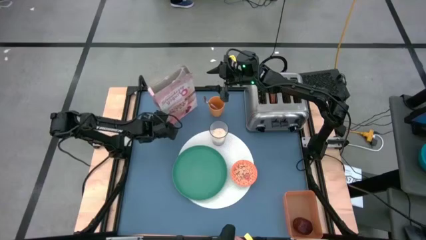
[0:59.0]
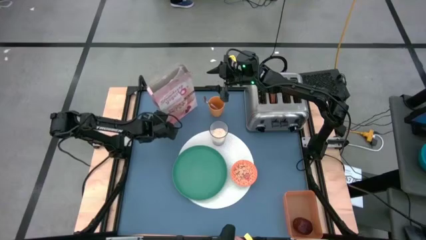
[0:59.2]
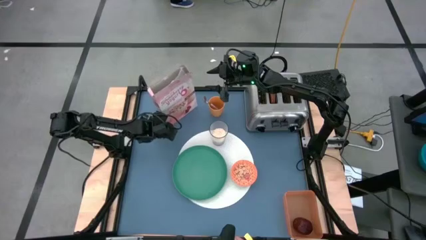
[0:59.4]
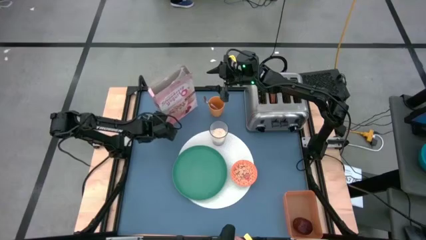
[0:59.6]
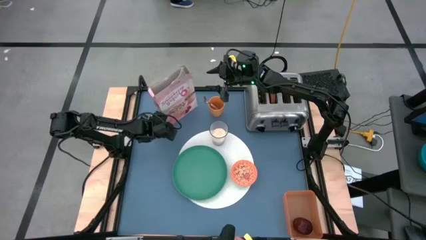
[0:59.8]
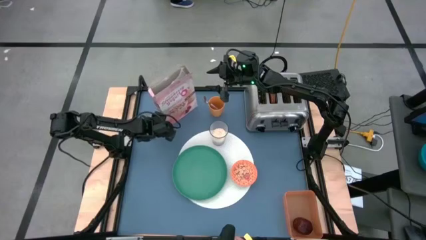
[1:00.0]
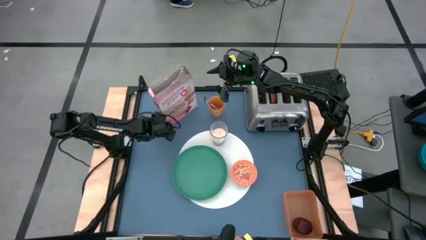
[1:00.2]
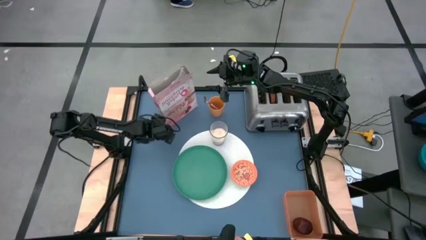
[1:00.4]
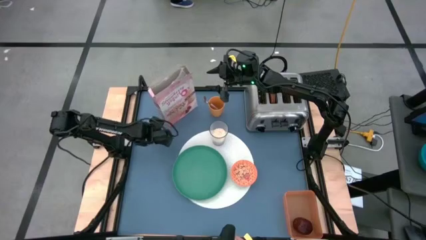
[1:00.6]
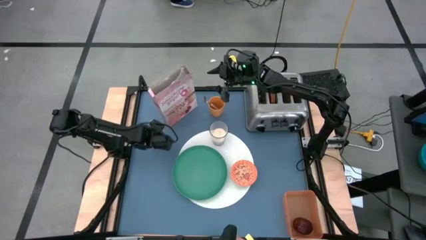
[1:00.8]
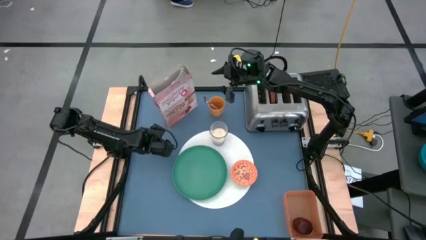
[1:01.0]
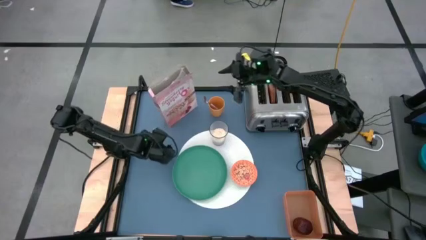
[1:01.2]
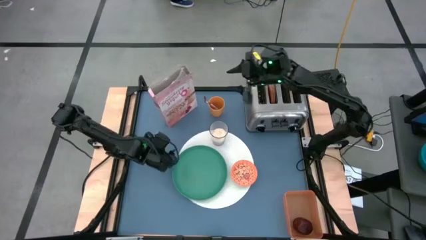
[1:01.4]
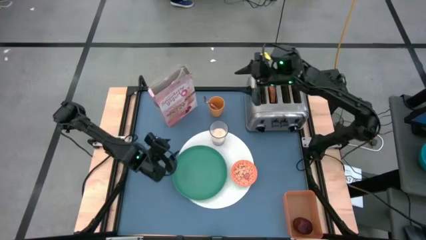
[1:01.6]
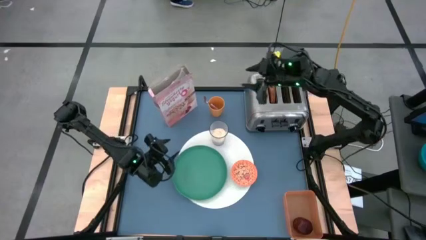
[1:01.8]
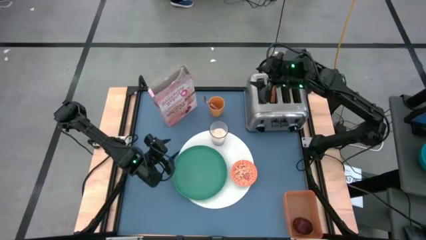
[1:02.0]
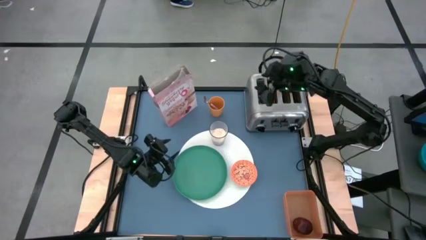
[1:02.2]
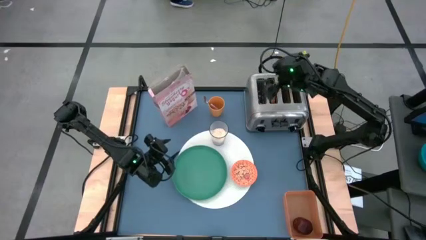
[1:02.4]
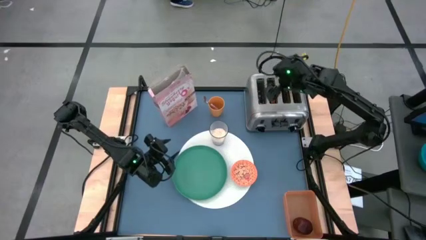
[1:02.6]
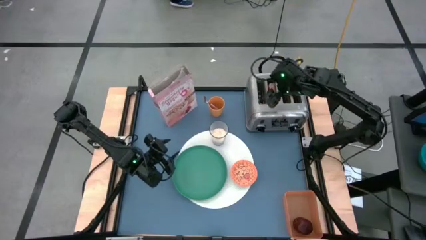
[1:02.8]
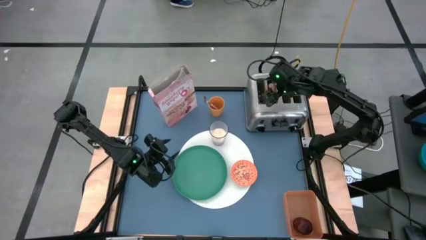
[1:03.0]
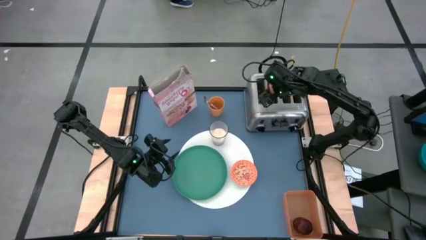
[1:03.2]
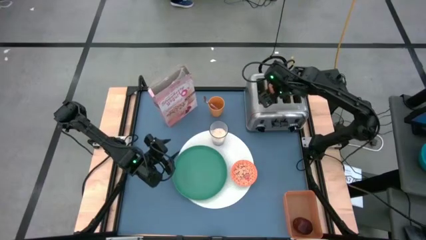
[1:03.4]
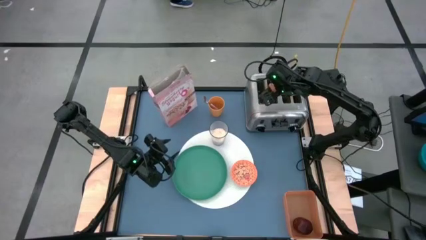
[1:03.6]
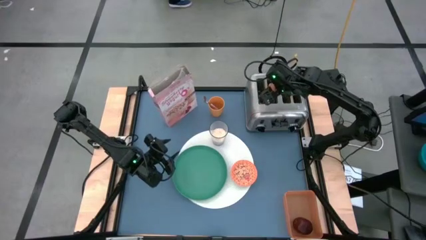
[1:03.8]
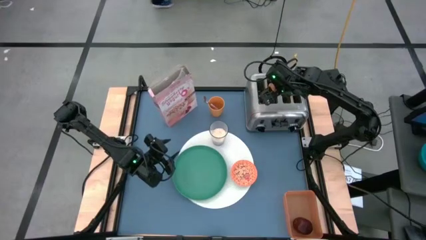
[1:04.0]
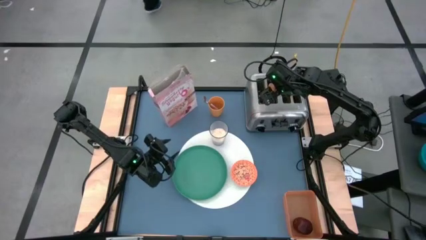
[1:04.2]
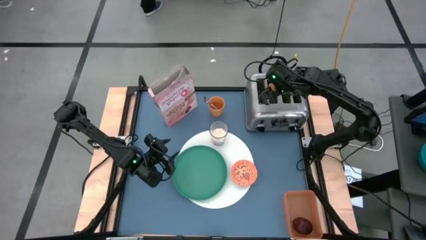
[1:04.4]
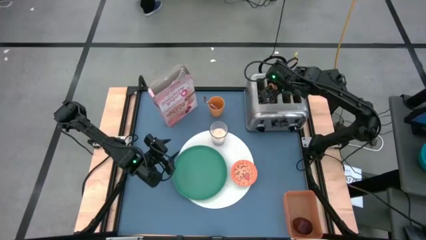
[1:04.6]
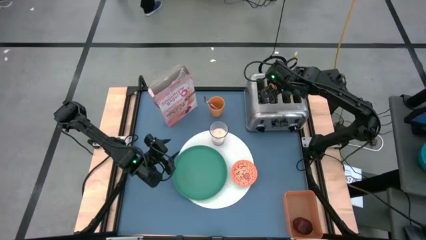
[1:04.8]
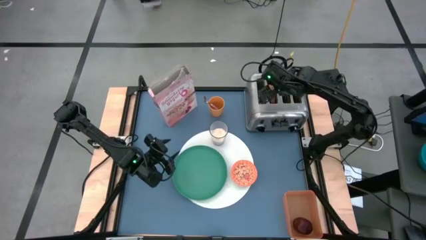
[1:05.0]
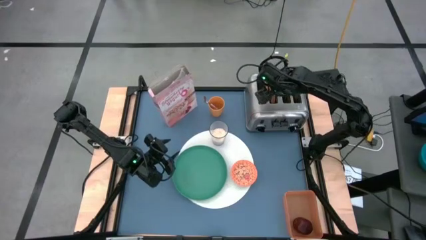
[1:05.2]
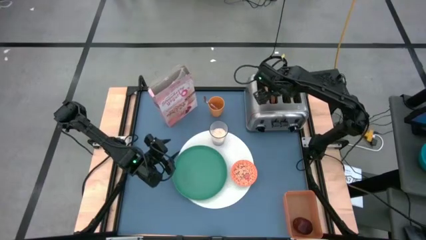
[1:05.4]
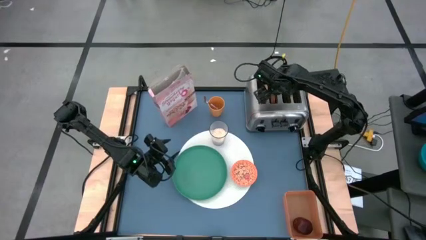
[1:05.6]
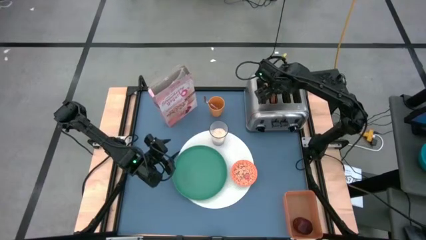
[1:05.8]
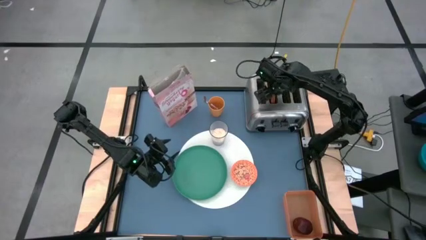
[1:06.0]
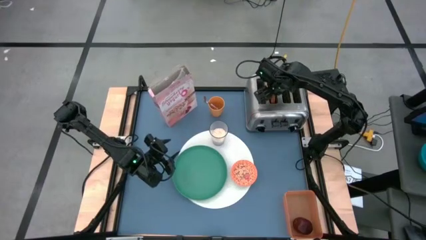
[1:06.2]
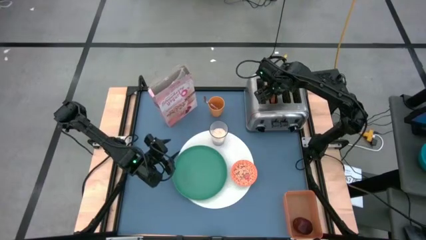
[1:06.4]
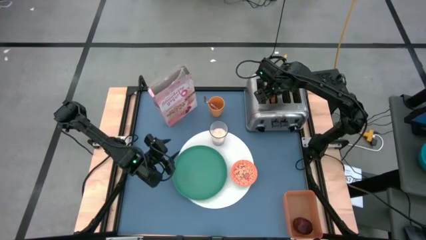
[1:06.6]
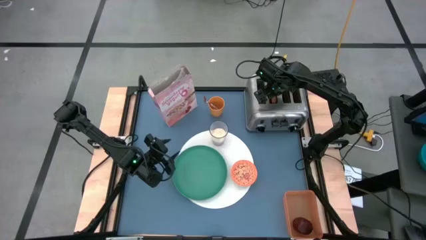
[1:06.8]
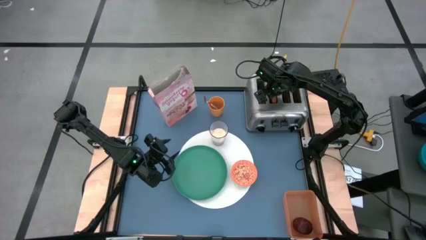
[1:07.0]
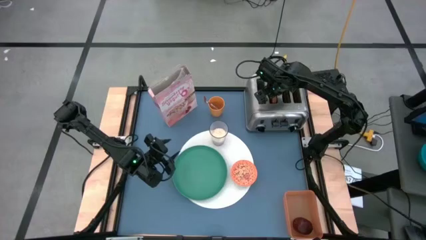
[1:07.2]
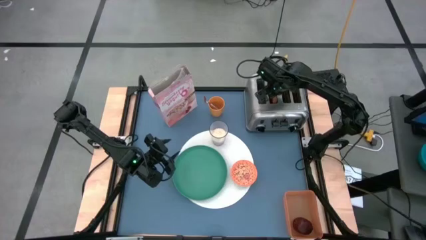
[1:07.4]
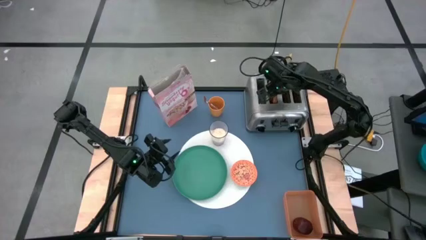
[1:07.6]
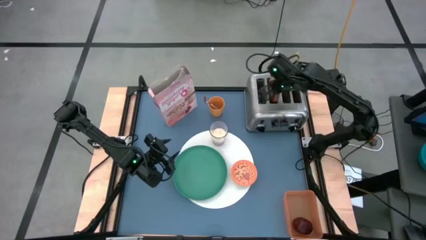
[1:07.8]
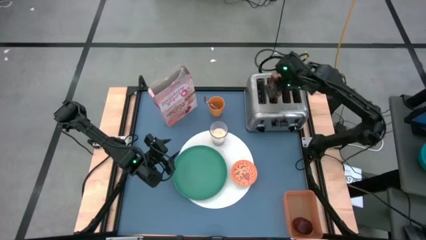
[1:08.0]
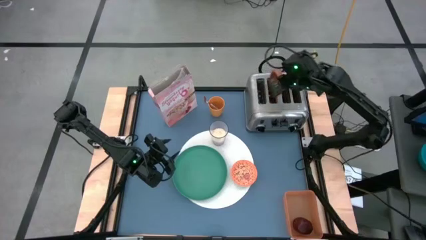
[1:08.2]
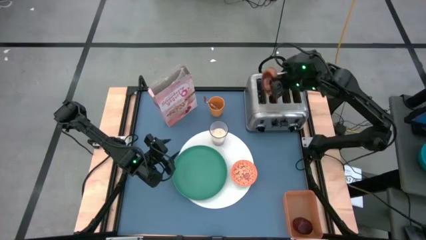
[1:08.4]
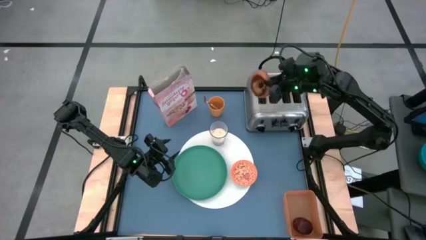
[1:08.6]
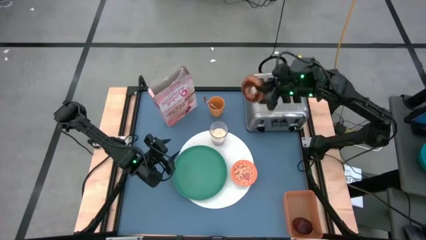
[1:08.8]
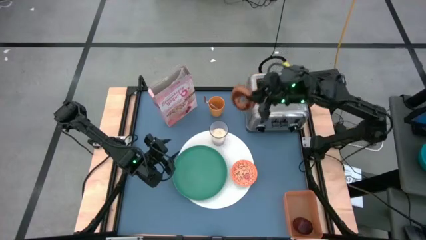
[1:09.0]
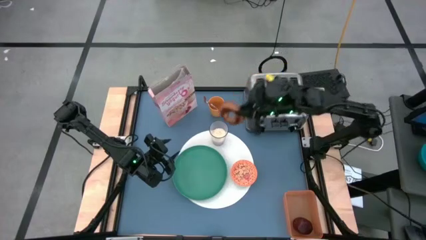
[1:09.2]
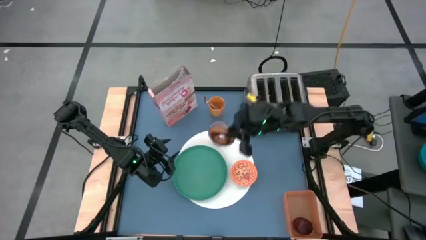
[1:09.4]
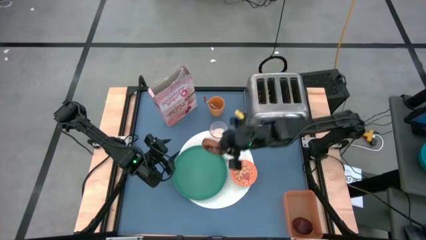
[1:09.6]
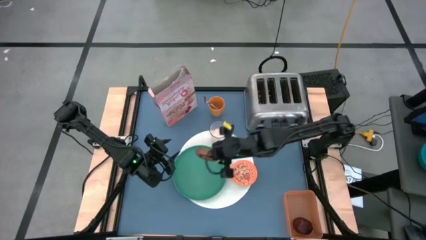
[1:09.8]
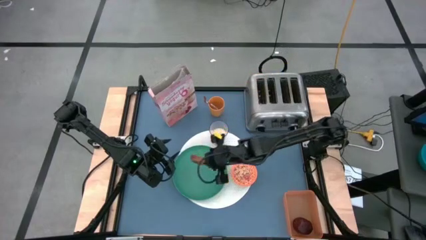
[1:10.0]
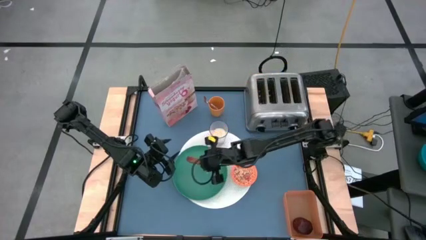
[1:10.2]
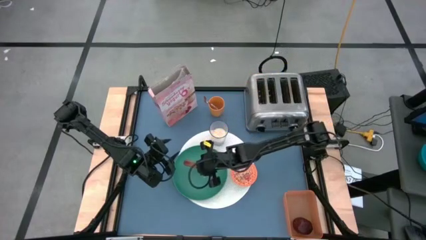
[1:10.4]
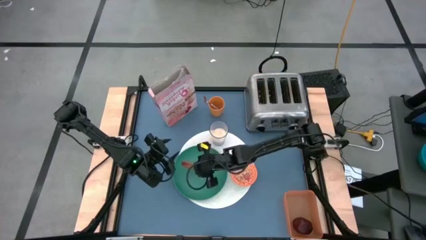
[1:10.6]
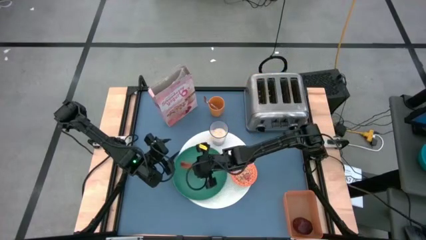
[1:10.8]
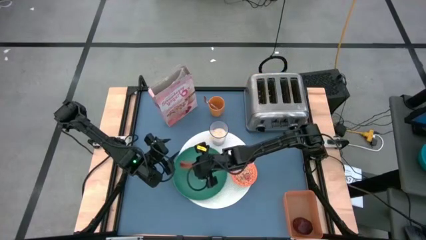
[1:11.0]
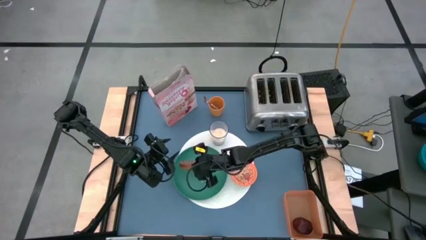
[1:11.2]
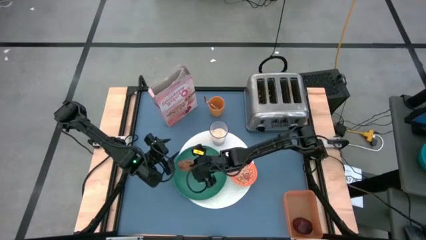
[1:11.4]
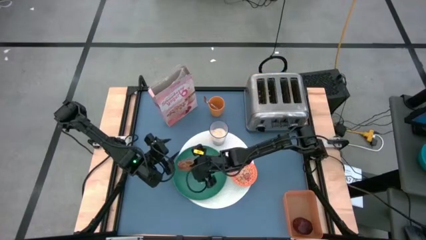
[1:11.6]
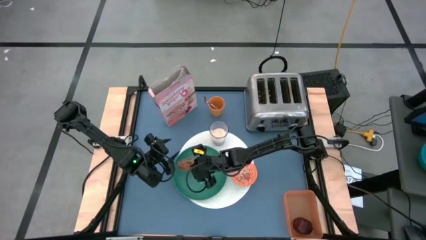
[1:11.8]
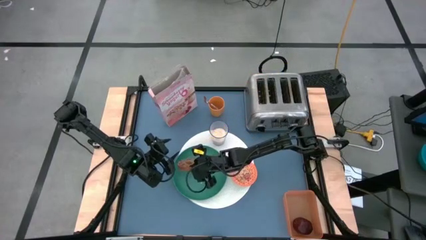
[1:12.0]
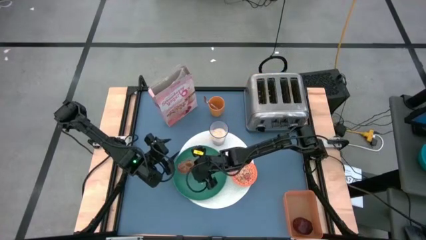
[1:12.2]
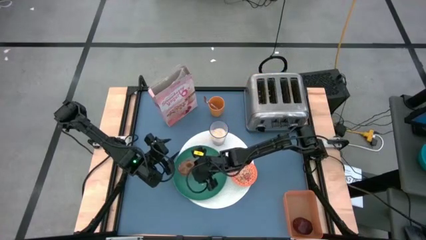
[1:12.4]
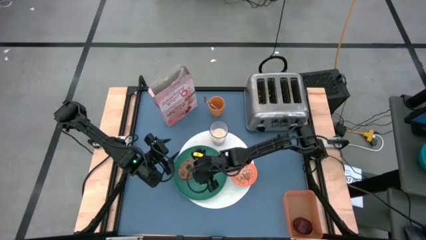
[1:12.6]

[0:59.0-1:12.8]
Task: Arrange a breakfast setting
Put the bread on the green plate

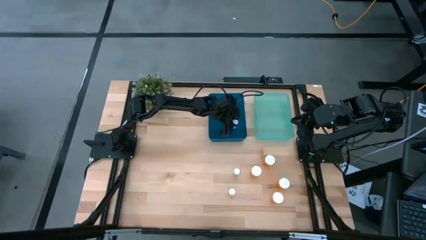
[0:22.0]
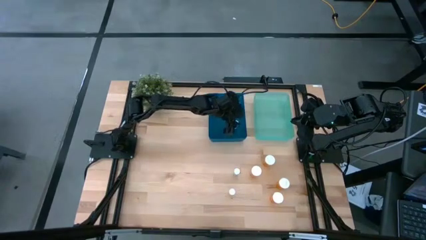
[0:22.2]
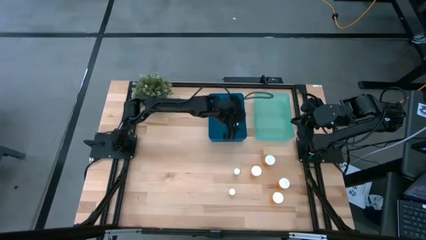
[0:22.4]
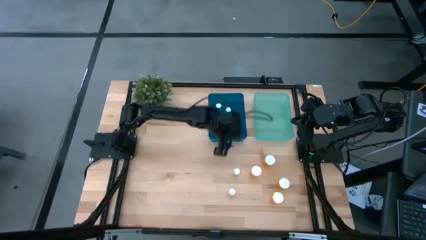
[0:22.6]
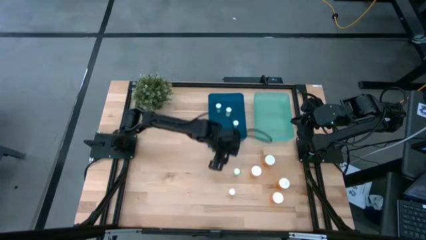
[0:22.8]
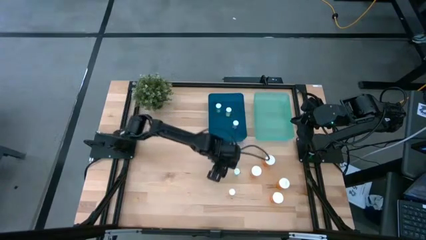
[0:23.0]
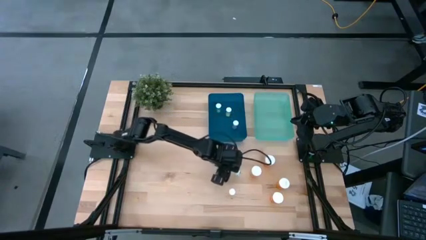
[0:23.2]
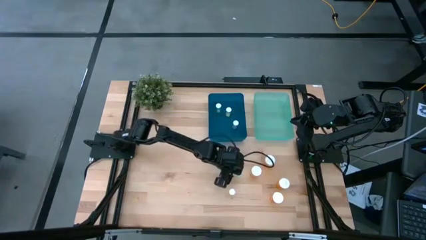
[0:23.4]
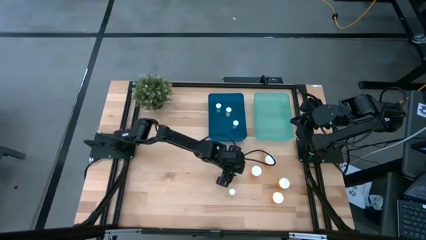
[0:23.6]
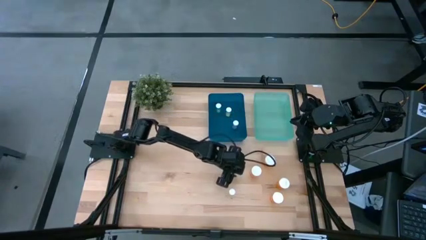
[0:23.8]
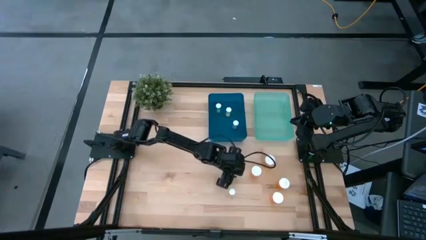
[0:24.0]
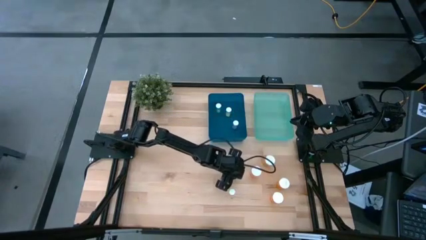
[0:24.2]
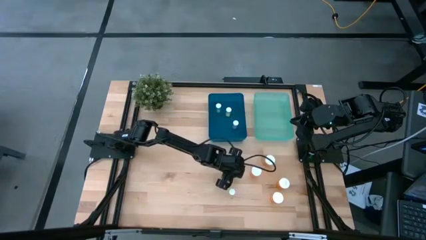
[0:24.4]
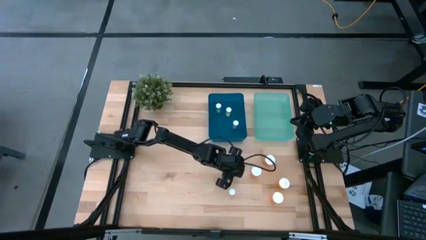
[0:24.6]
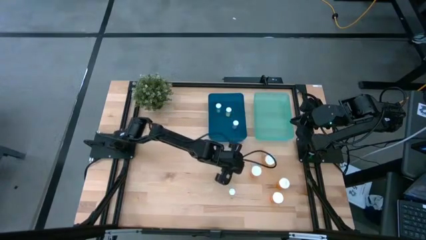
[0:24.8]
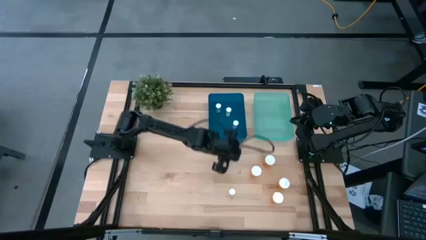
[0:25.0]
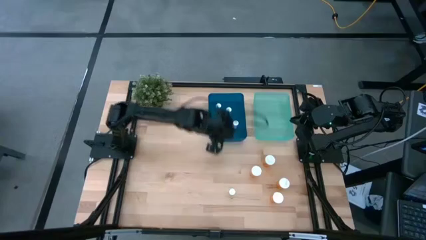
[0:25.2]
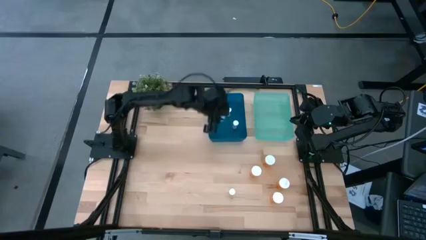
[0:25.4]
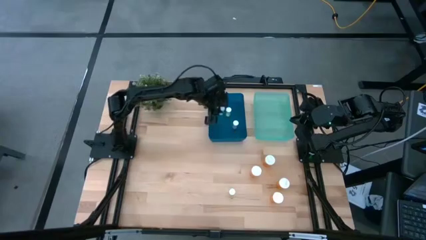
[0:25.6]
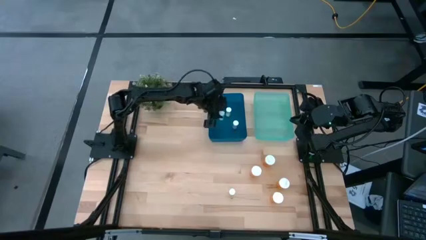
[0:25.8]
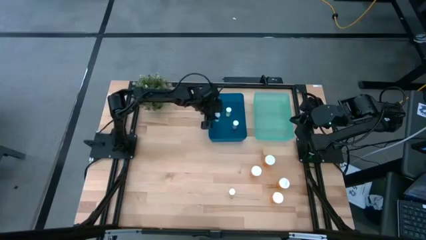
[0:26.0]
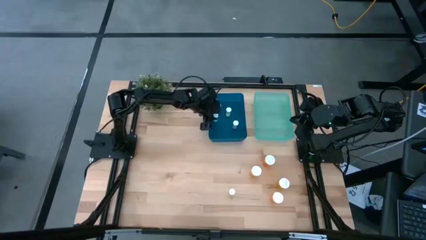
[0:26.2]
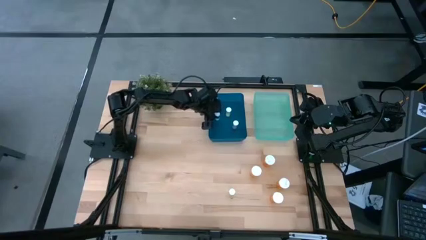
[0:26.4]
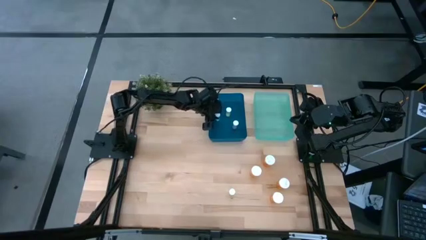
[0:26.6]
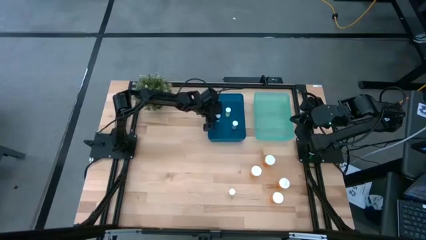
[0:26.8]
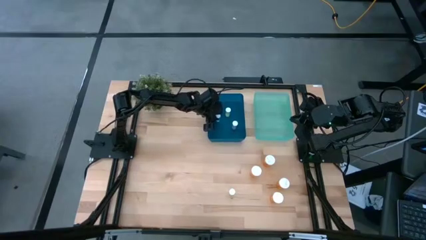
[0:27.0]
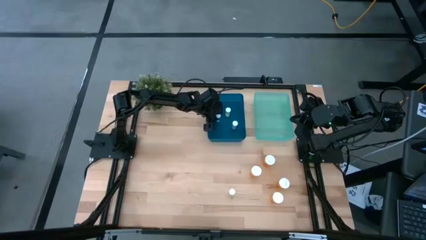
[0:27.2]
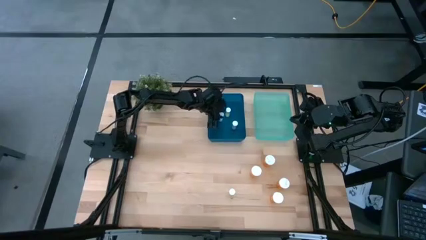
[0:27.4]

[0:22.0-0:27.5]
Task: Pick and place medicine bottles into bin by pill shape (circle, oval)
Put the small blue pill bottle into the blue bin
